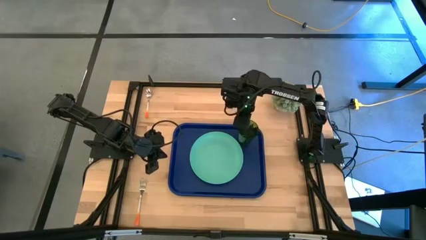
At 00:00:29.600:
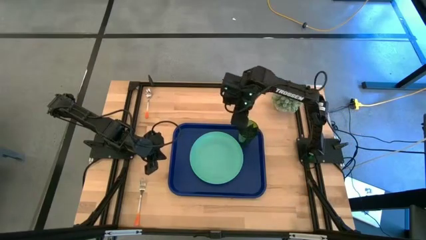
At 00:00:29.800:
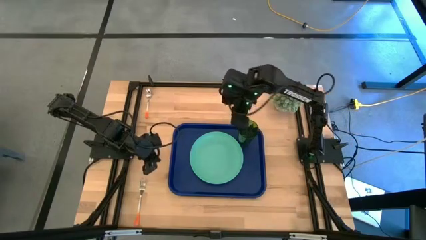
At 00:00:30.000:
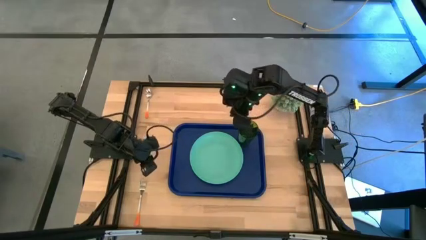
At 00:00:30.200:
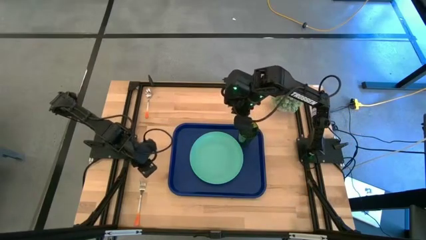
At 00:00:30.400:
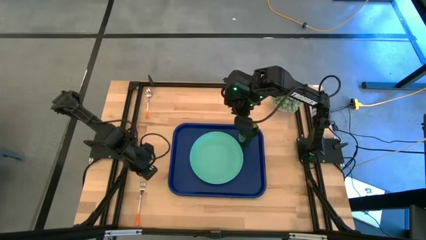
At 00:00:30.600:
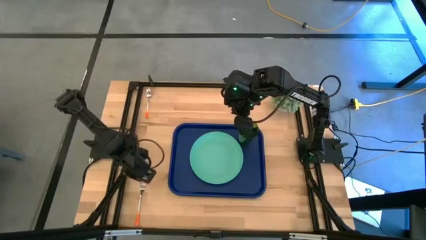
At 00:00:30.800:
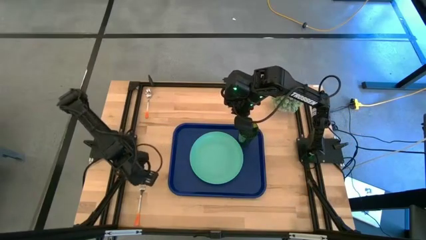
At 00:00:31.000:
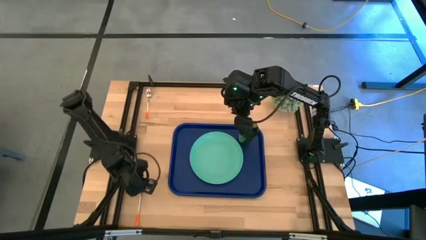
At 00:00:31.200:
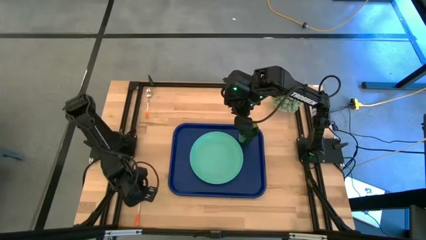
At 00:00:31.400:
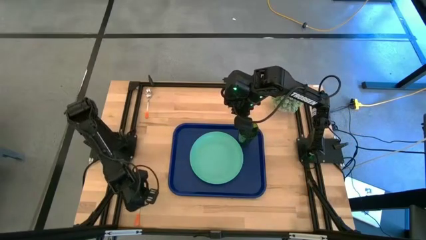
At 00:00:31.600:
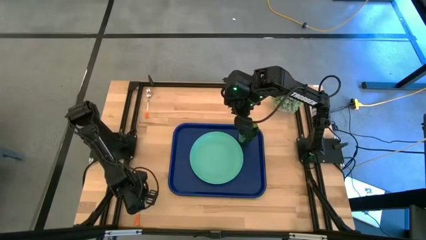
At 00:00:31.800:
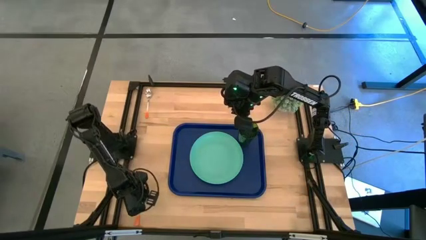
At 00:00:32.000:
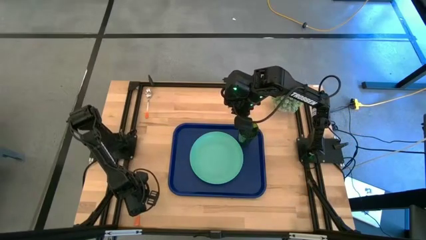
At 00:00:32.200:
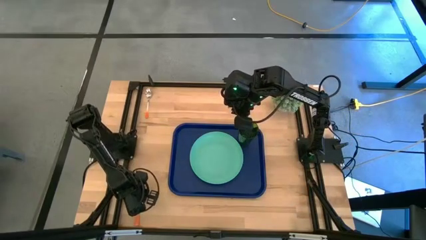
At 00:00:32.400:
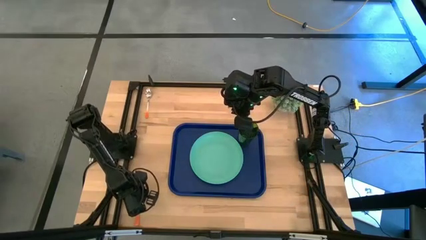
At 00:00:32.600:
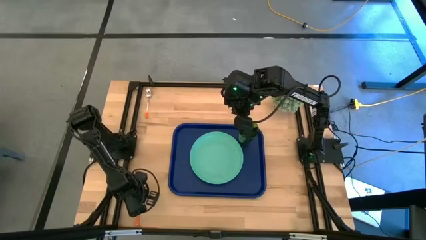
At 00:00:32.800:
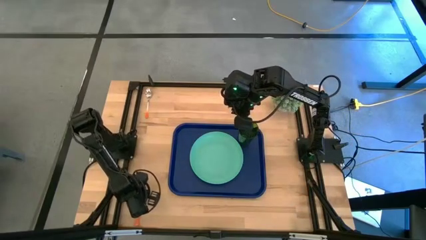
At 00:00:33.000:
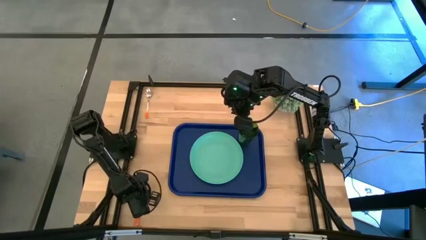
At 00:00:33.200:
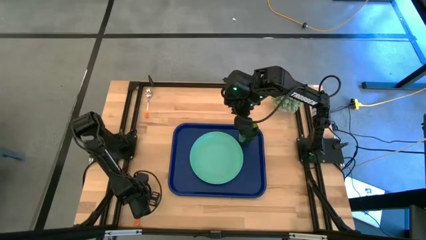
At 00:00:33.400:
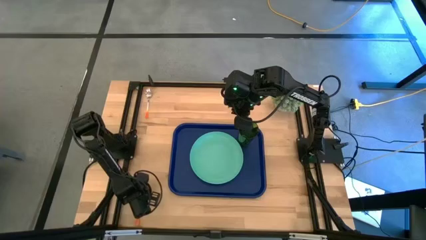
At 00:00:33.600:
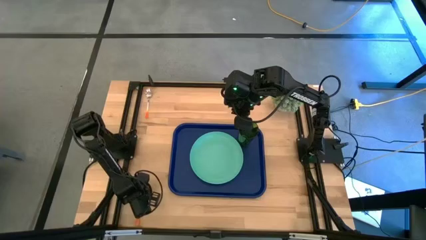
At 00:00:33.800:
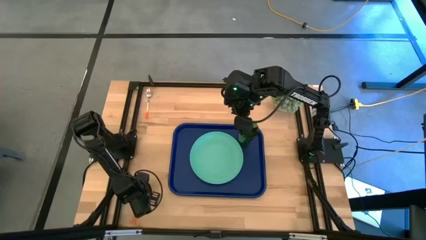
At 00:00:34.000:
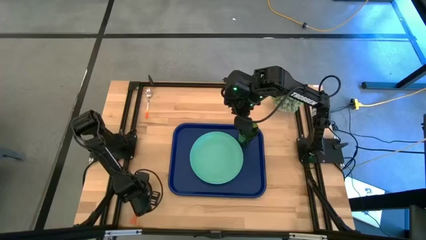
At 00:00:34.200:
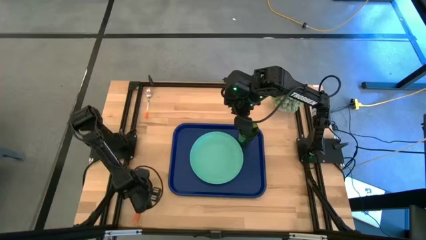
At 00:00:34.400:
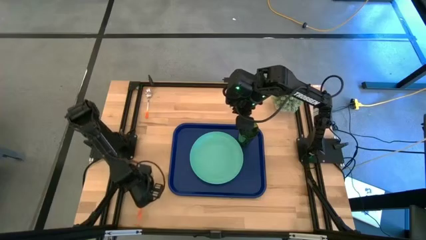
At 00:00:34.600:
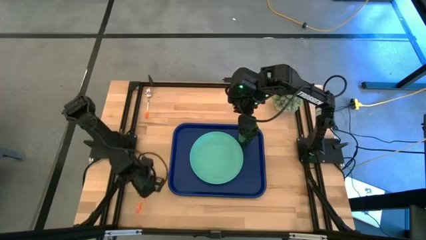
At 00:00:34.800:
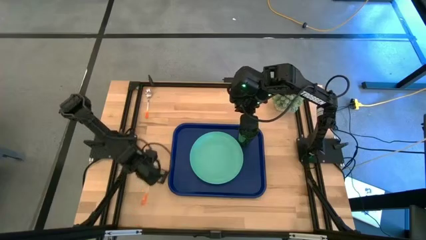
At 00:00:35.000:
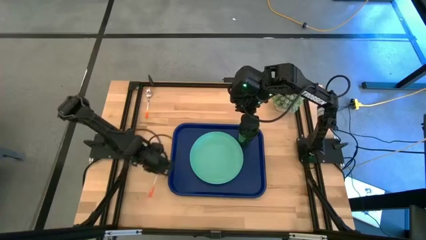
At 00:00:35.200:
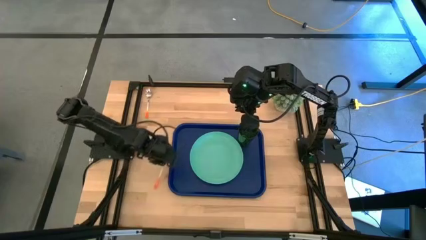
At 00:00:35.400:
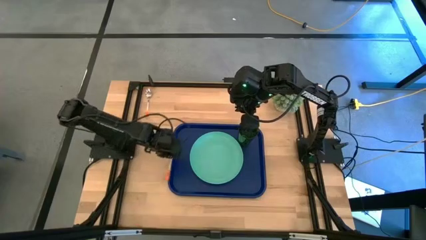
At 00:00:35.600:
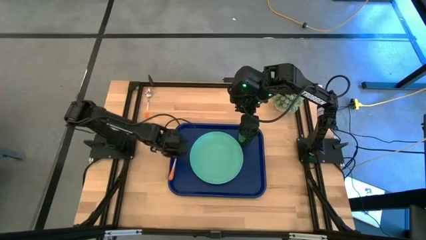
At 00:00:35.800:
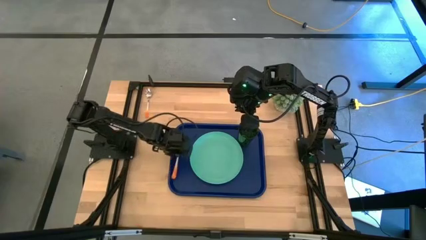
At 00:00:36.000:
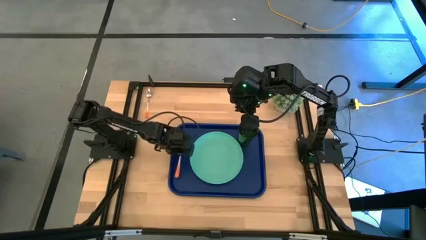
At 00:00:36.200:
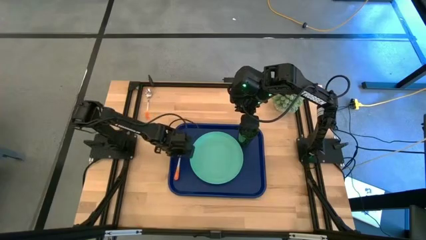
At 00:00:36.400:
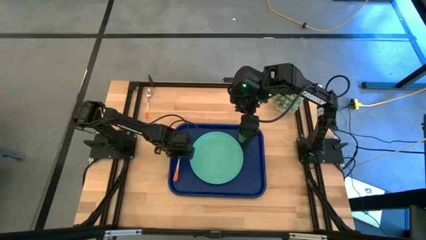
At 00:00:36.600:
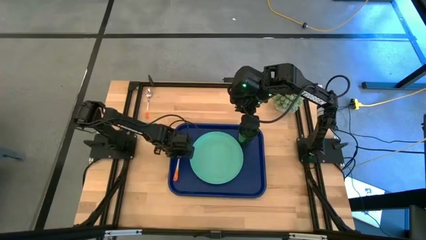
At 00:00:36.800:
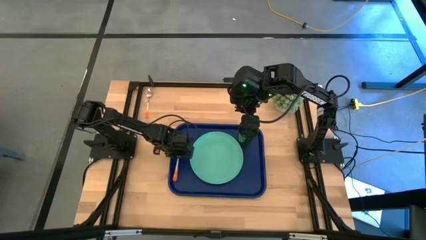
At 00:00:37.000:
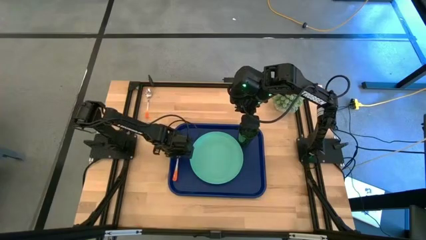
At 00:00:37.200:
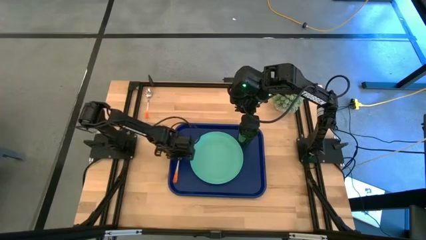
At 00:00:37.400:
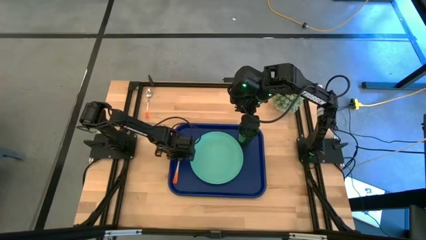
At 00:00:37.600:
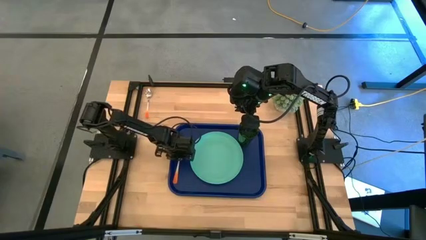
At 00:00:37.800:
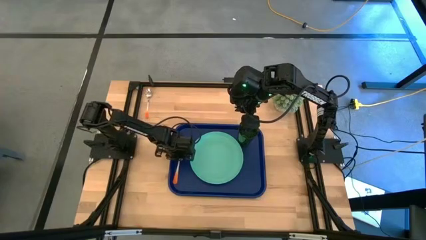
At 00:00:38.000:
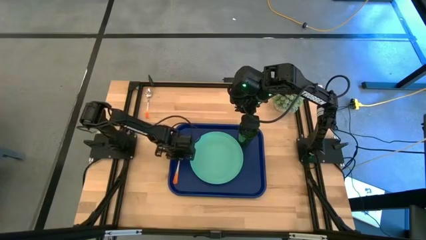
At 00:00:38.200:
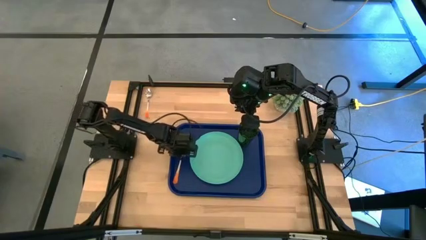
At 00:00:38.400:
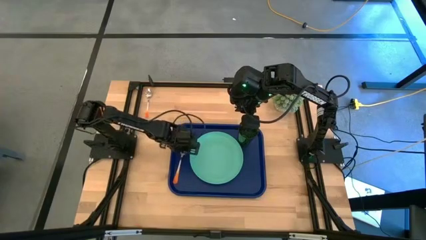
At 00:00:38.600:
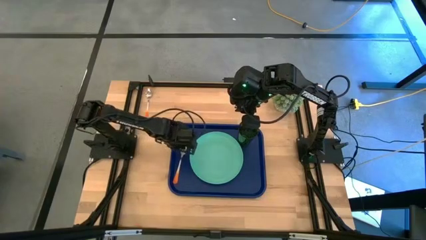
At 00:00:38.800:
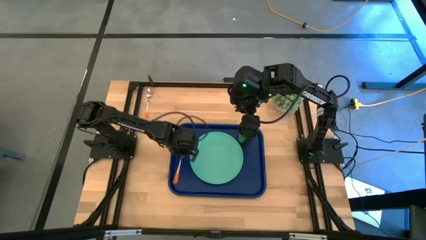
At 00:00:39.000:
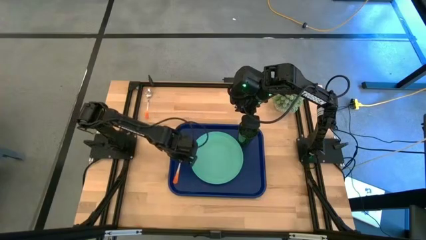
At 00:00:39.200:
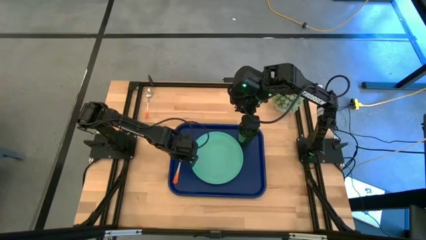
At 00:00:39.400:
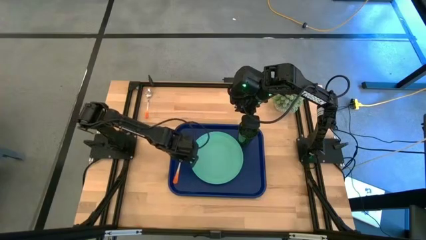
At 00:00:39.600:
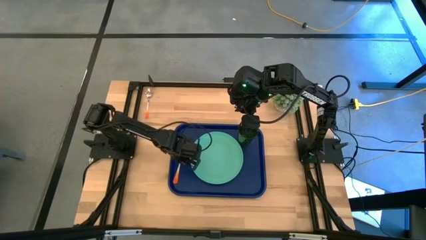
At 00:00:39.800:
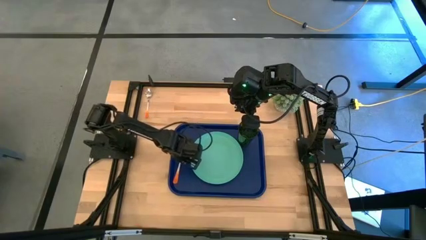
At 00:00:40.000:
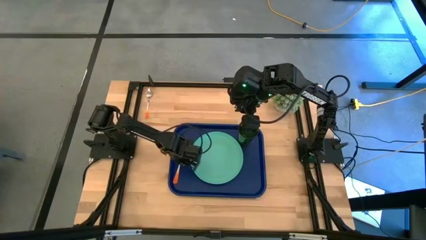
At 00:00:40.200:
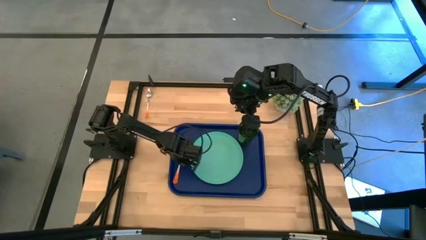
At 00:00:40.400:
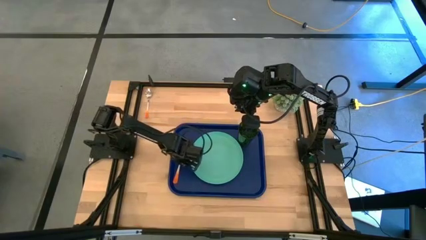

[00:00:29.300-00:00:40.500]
Task: Pick and place plate/cup/fork/spoon on tray
Put the orange fork on the left of the green plate on the blue tray

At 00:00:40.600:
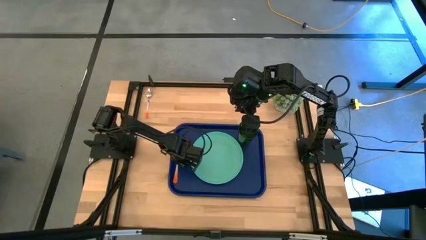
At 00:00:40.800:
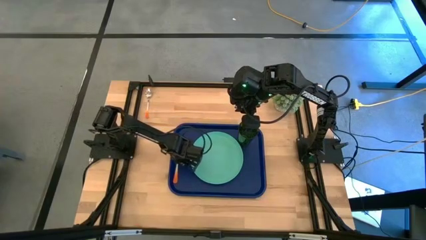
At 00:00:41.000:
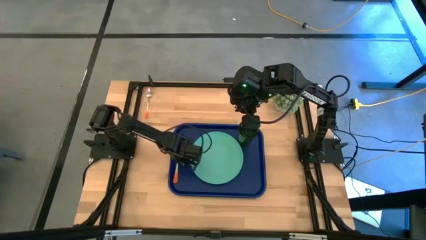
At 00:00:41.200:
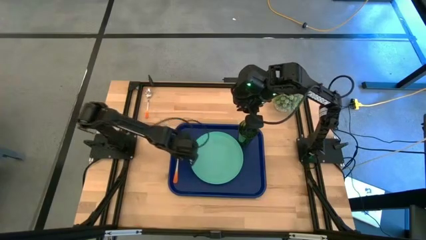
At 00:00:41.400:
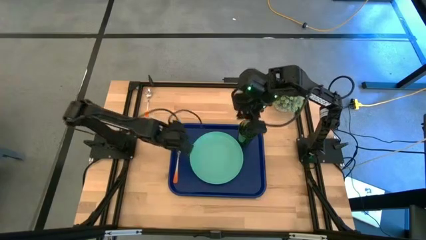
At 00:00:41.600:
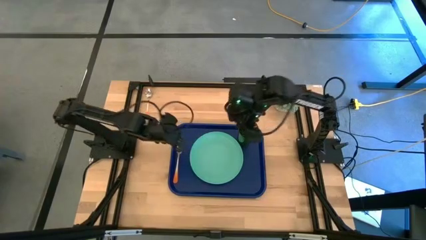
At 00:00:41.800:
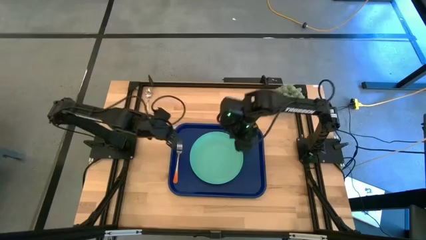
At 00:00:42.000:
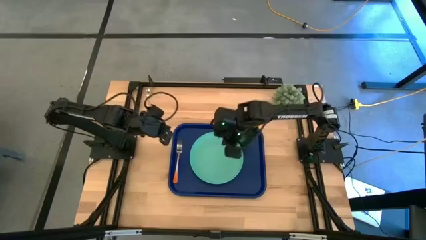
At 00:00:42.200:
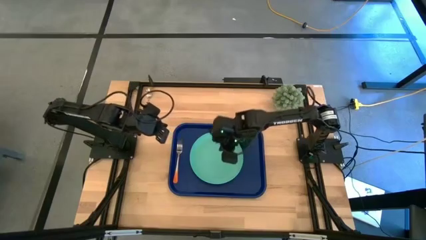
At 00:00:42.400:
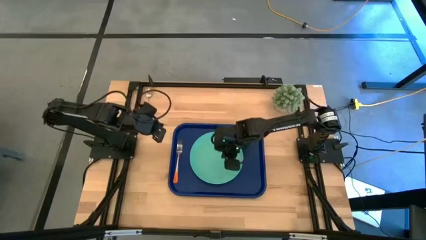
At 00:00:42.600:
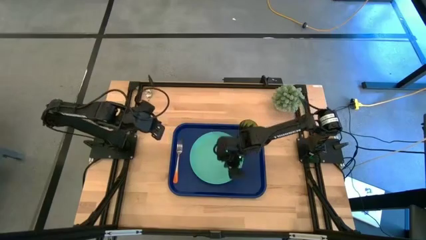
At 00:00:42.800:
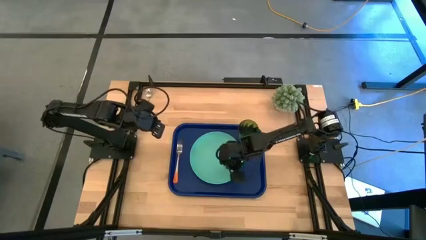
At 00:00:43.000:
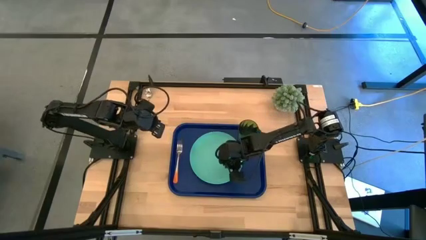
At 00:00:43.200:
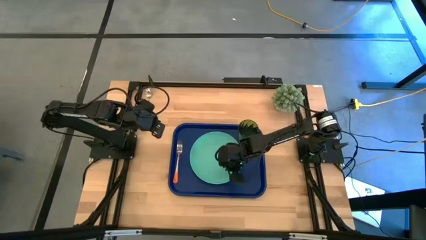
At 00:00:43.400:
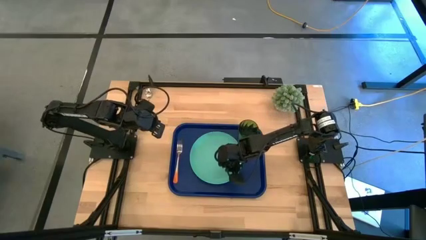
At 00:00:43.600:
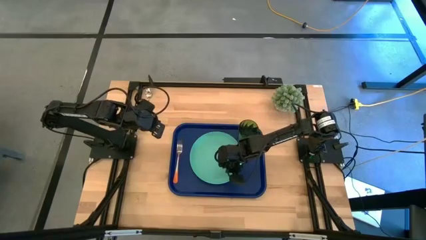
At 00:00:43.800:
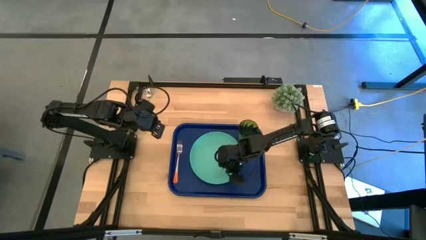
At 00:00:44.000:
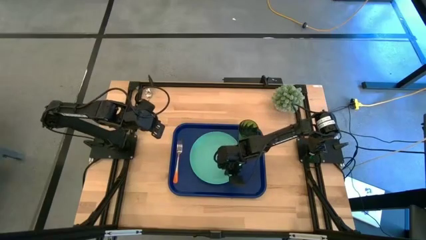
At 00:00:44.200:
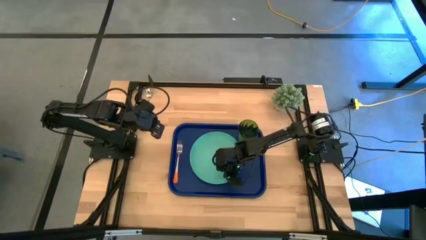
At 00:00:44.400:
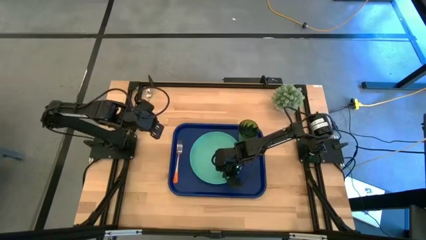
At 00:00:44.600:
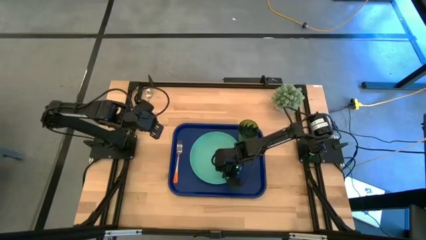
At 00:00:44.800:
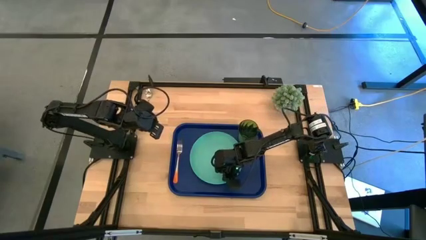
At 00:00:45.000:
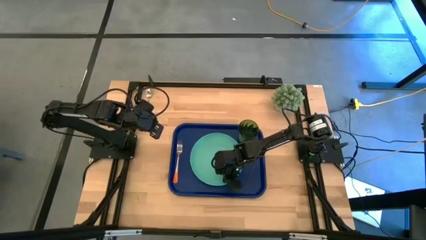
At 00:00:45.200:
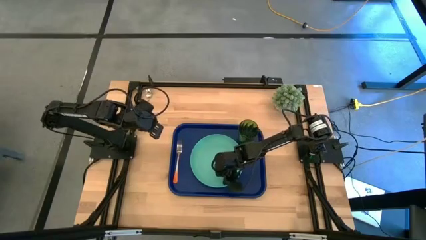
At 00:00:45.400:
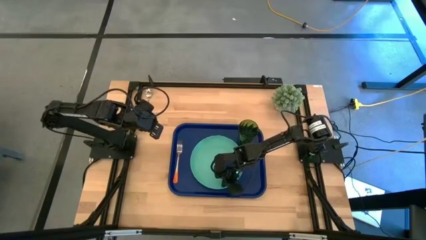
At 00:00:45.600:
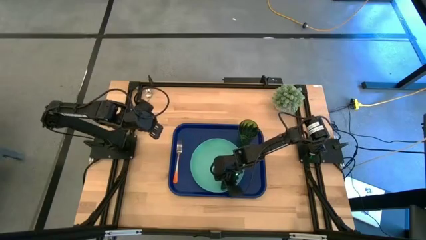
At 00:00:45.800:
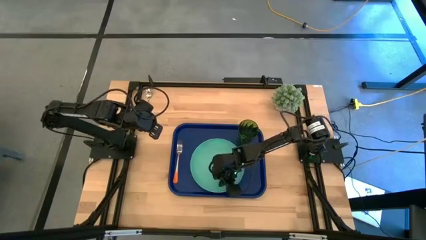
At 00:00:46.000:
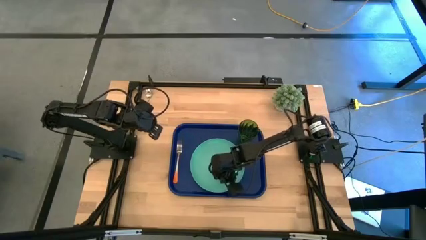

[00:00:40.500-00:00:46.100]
Adjust the green plate
